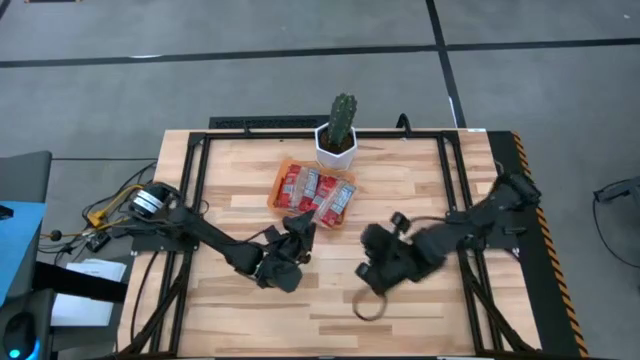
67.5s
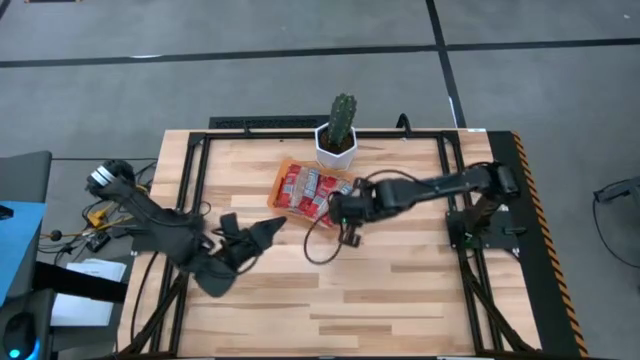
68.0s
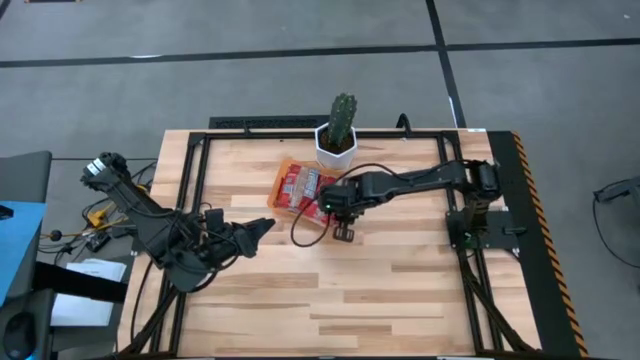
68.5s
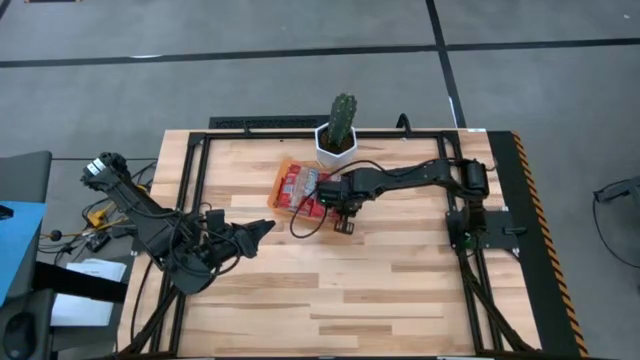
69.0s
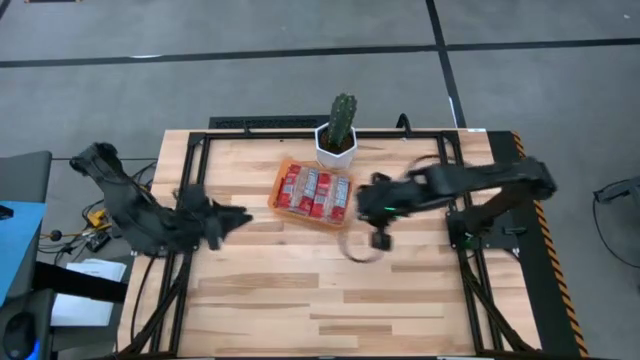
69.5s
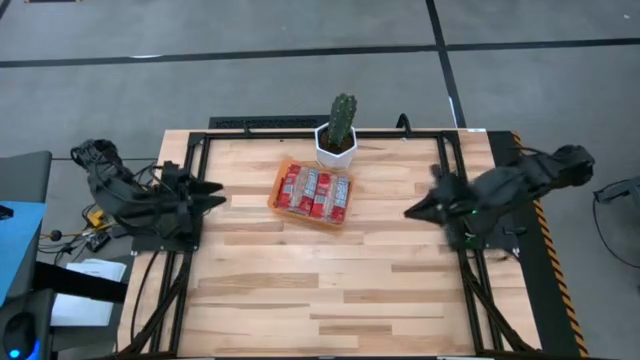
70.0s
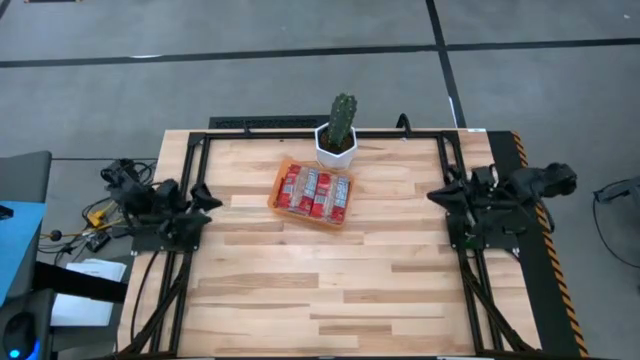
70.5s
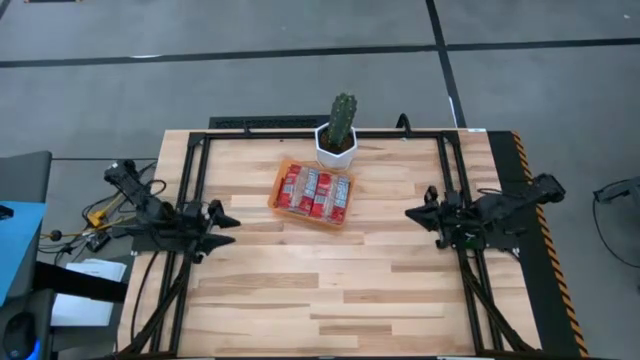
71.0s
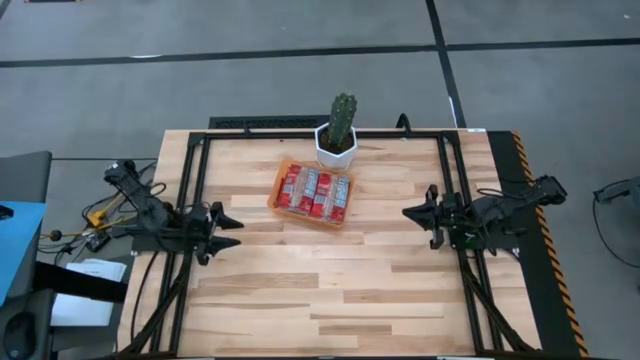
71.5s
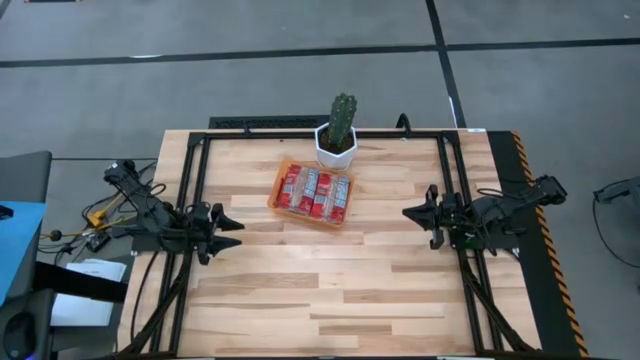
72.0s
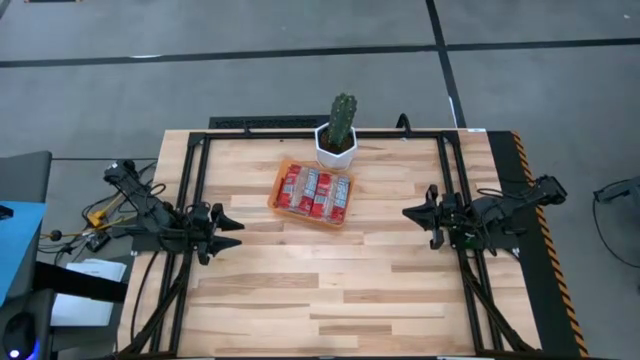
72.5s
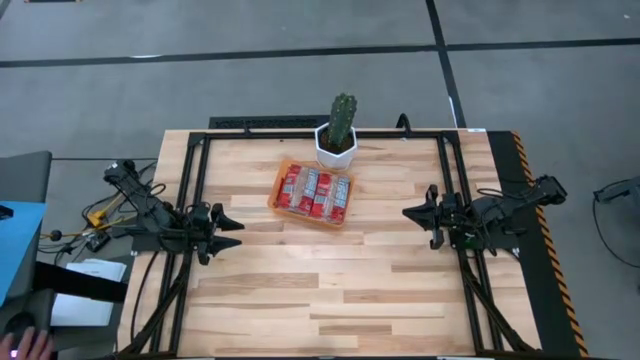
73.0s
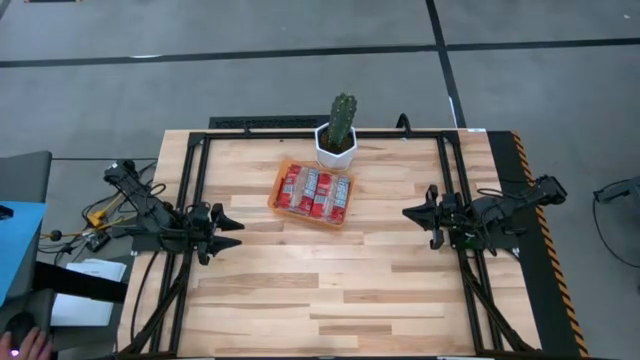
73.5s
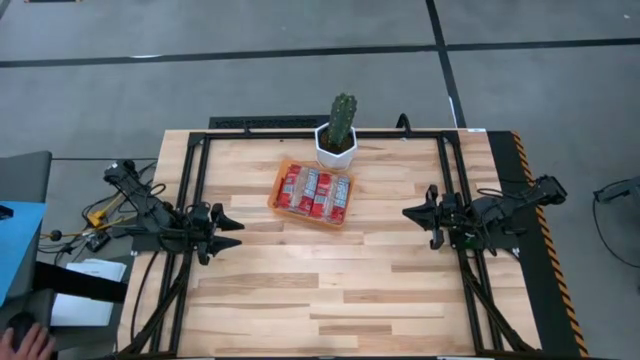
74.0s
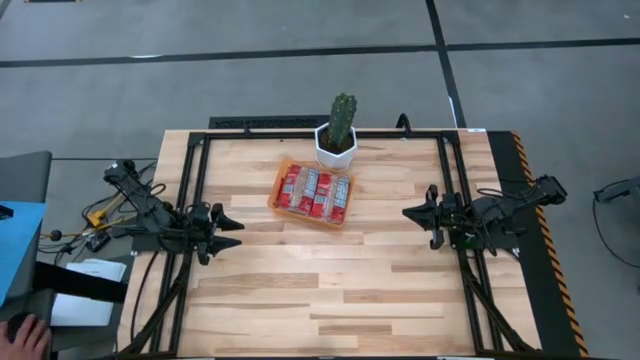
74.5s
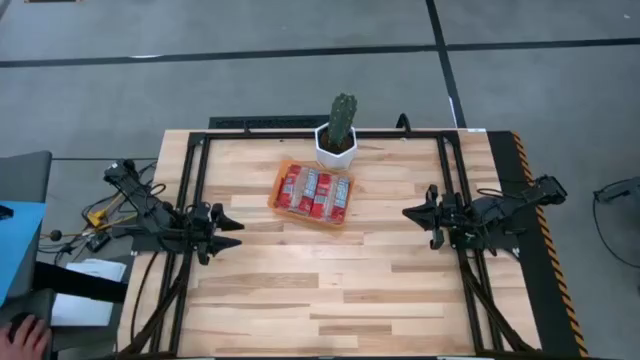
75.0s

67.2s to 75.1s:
Task: Sort popcorn bags into baskets
Return to Home Position

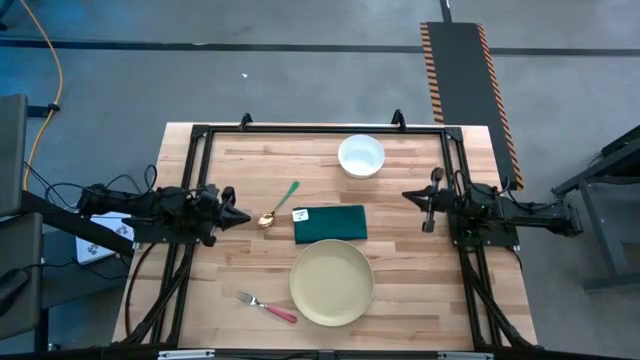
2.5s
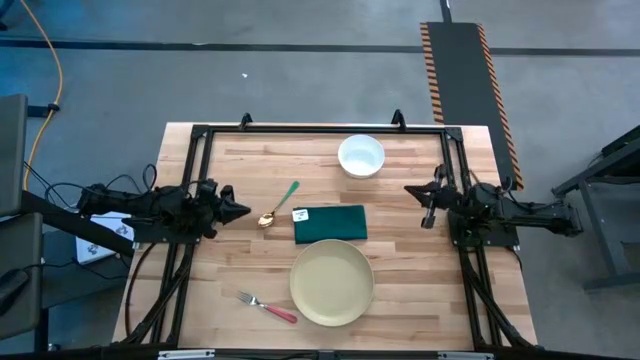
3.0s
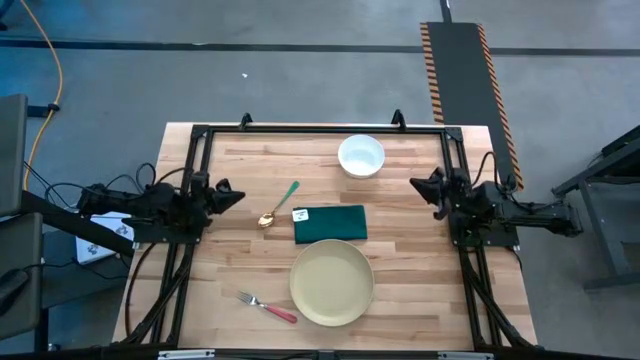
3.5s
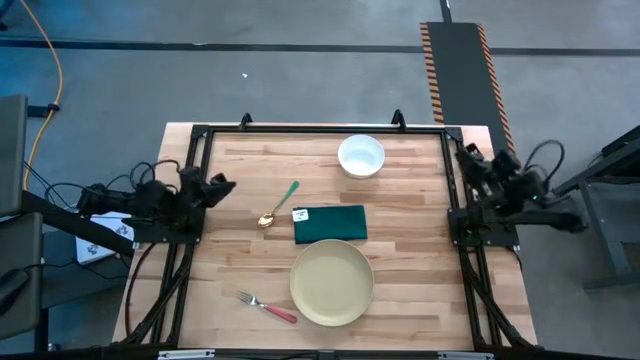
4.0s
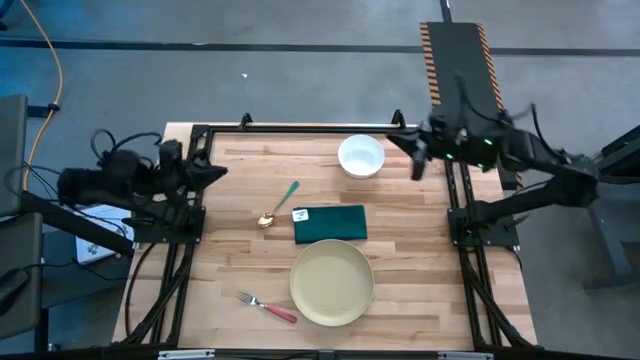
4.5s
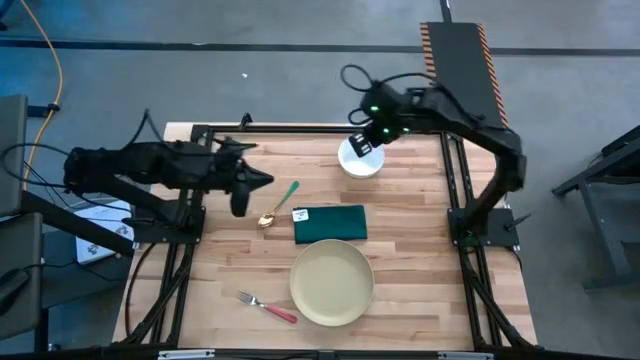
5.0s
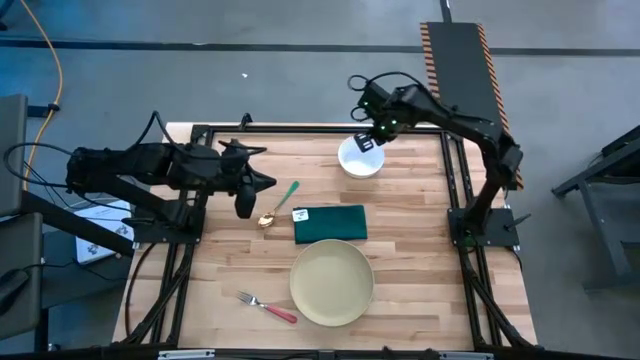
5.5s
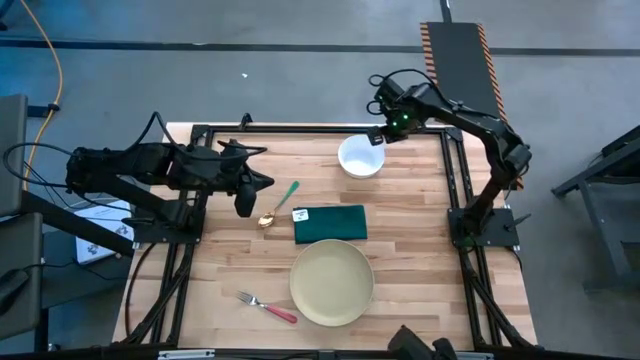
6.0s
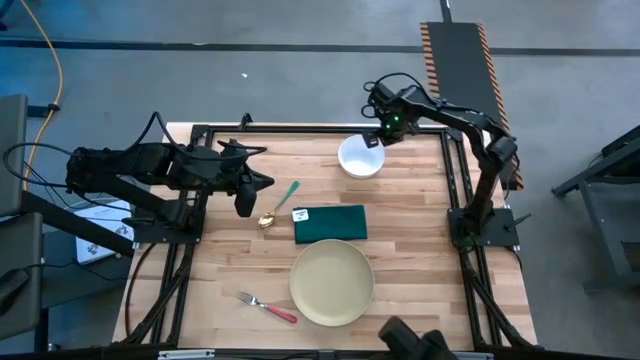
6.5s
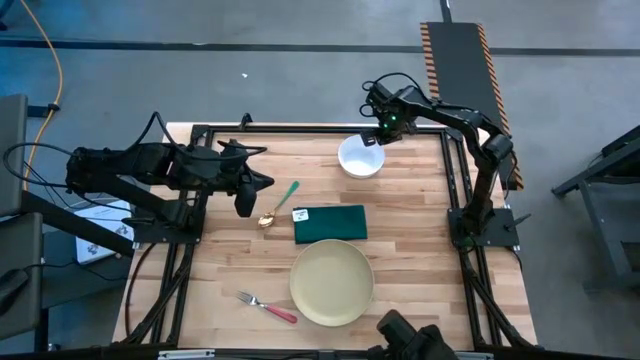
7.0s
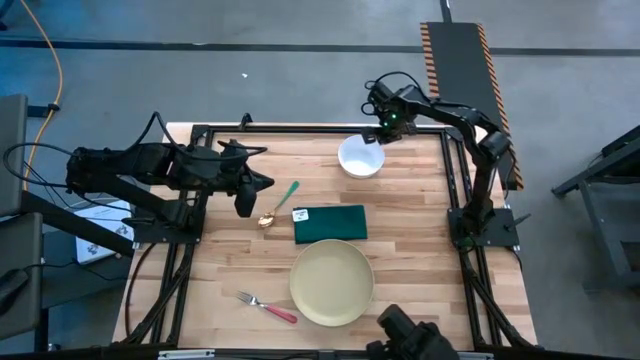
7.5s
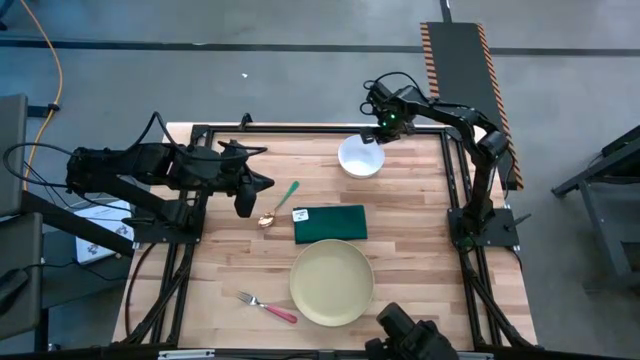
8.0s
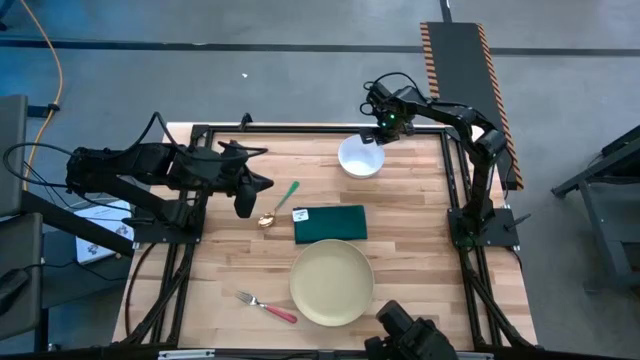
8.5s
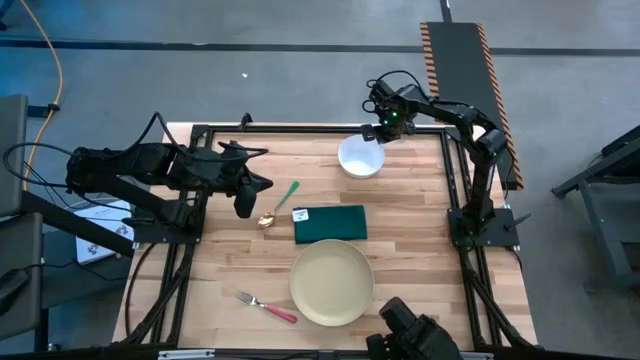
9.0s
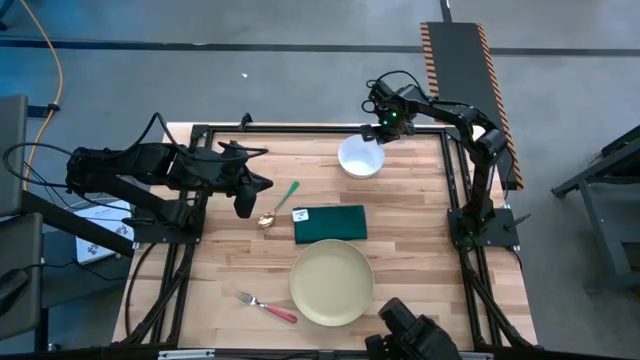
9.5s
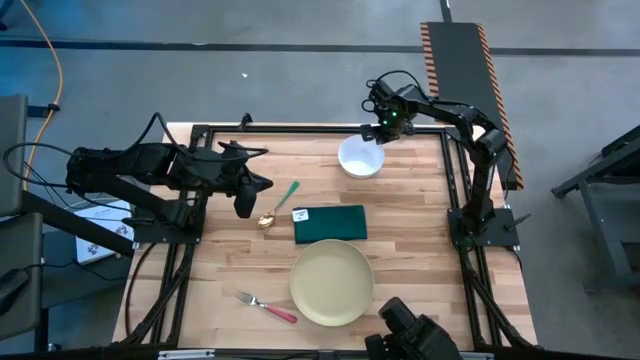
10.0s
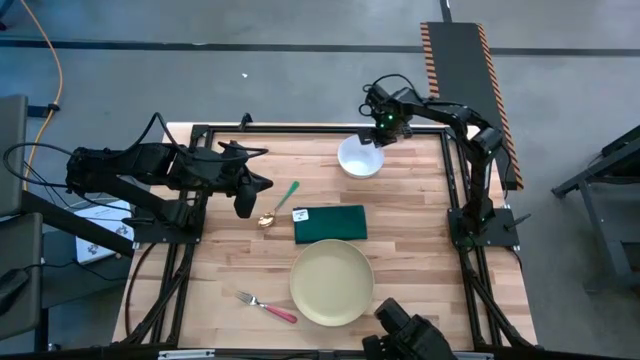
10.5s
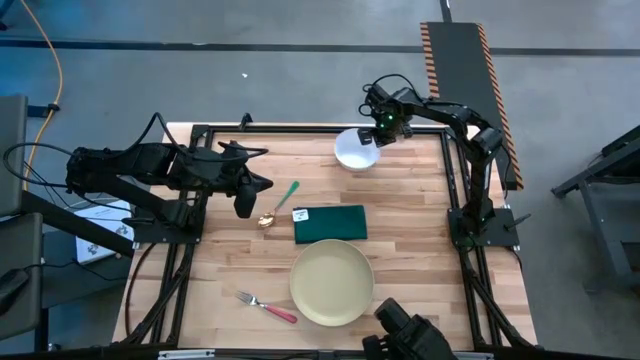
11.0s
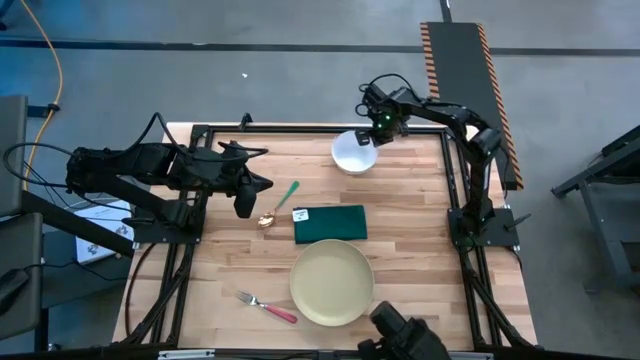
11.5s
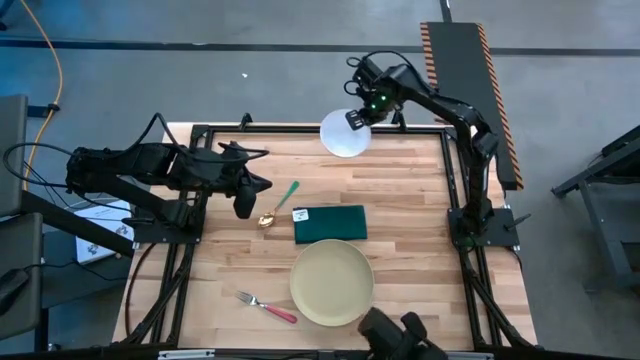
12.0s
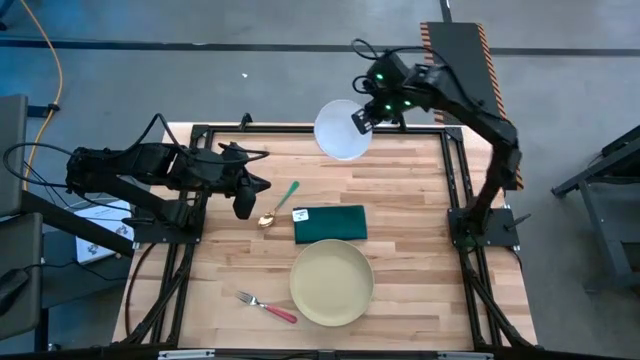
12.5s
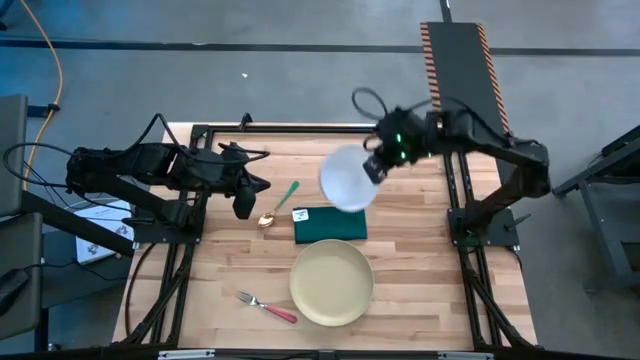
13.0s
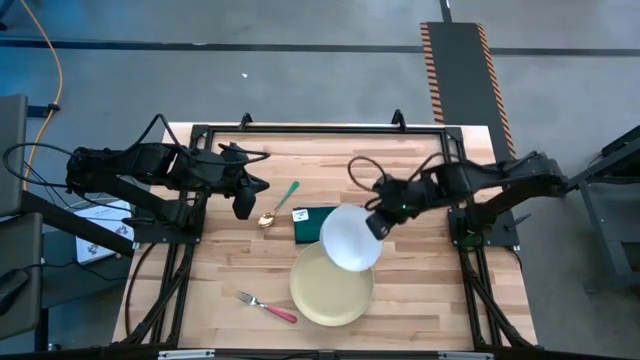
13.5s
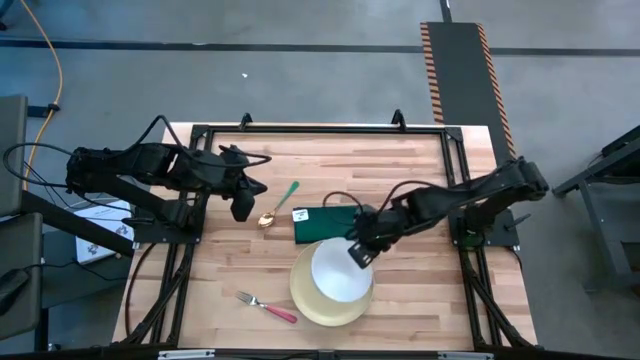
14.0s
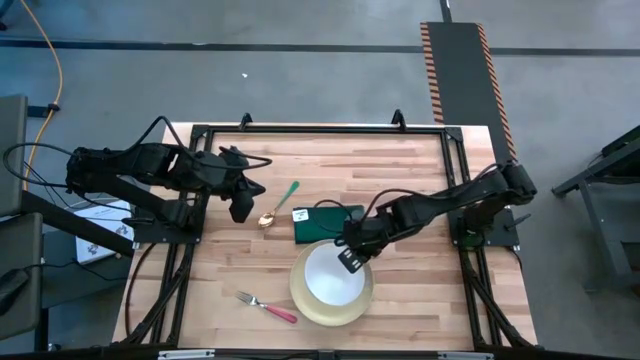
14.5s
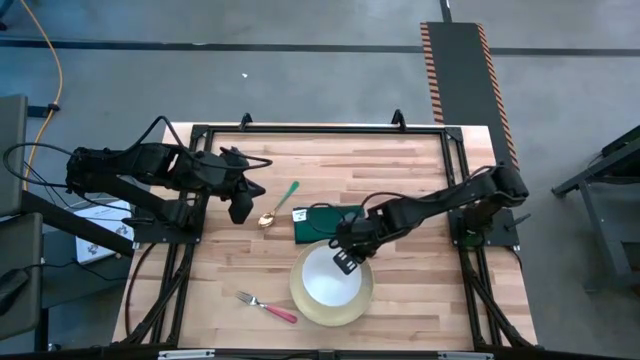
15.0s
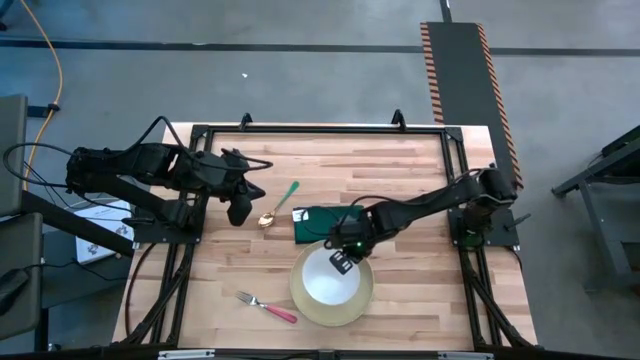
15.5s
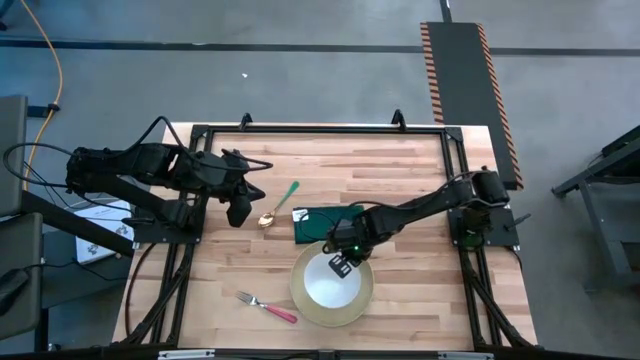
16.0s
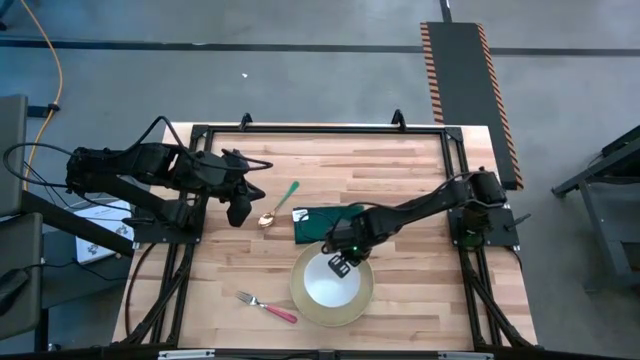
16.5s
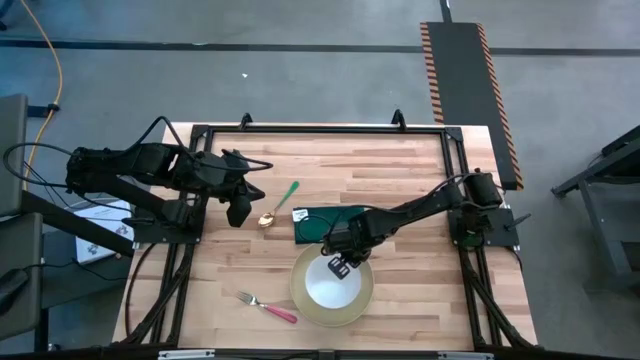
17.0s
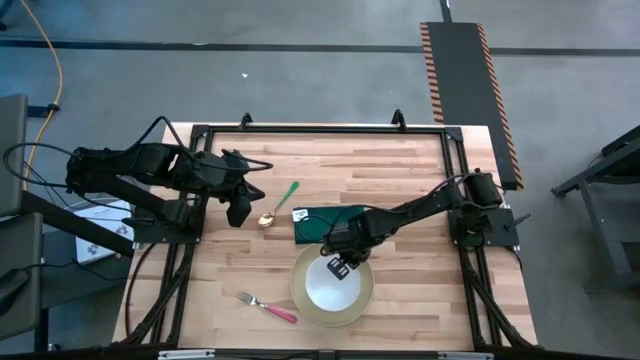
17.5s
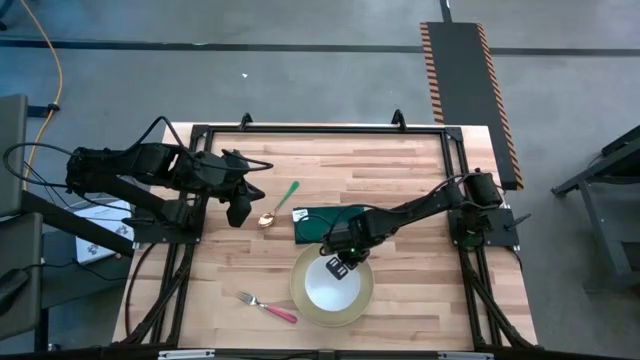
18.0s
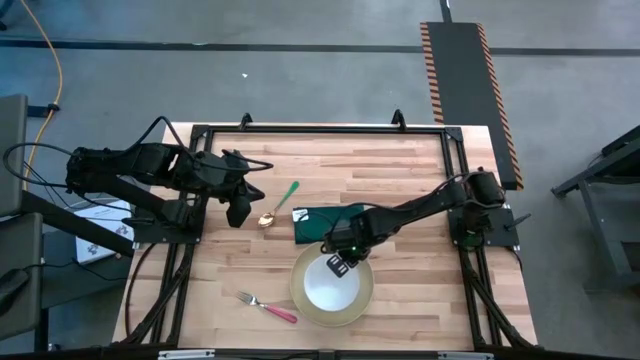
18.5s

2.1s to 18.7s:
Task: Set table place
Put the white bowl on top of the yellow plate
